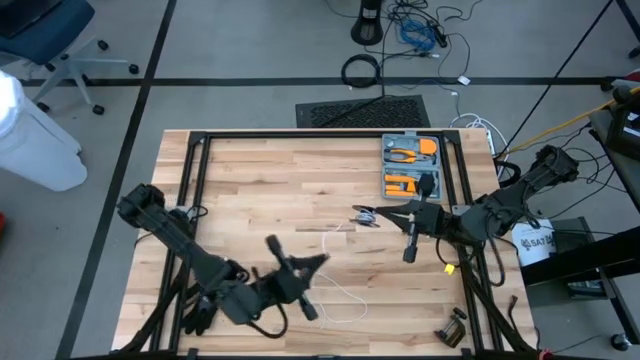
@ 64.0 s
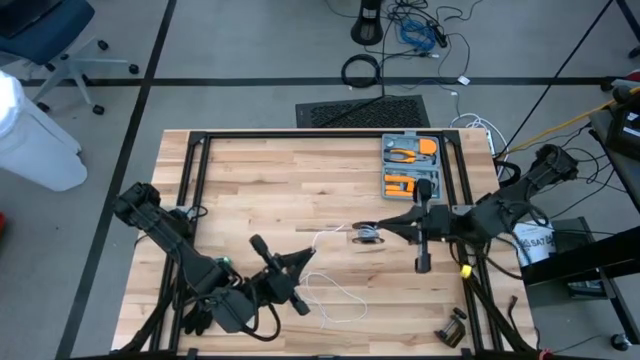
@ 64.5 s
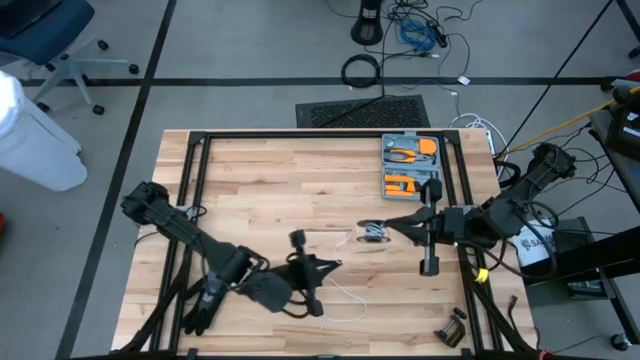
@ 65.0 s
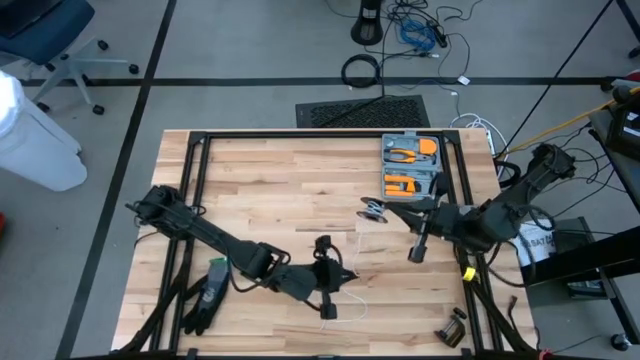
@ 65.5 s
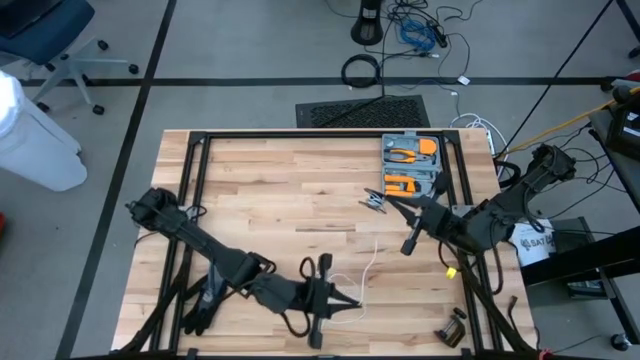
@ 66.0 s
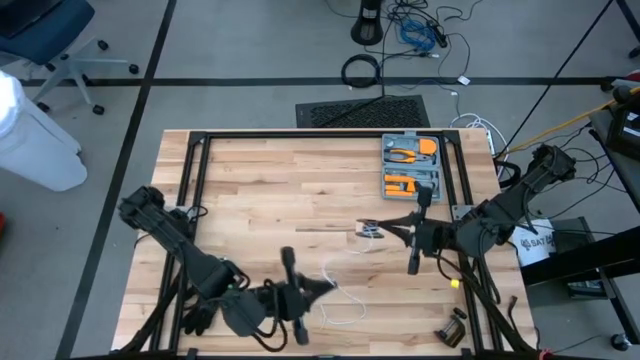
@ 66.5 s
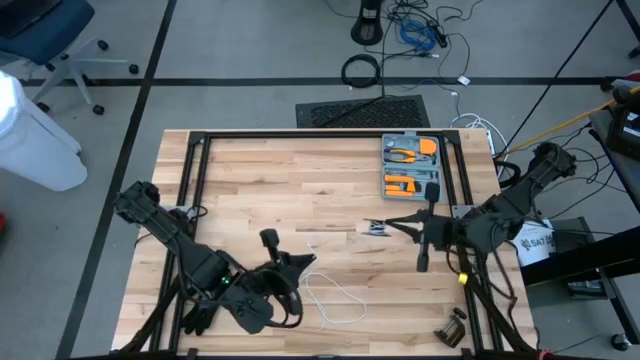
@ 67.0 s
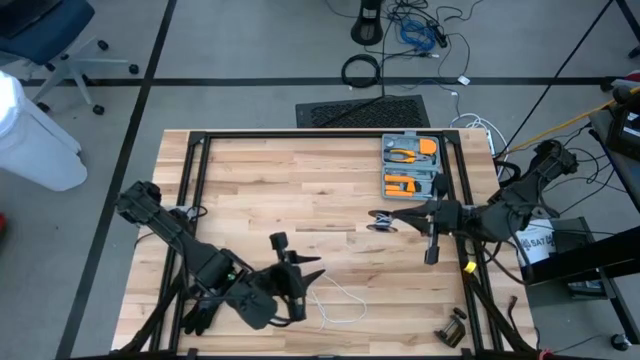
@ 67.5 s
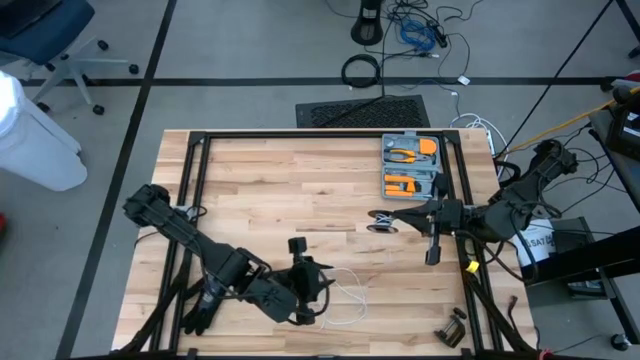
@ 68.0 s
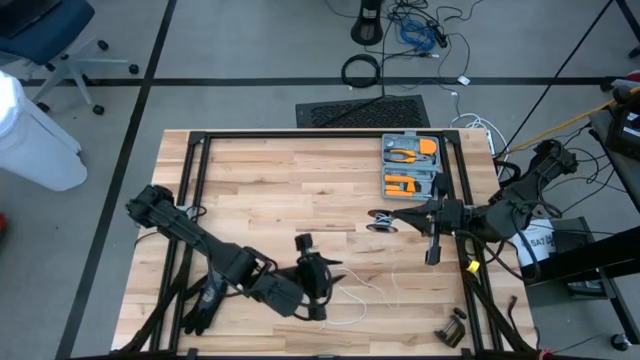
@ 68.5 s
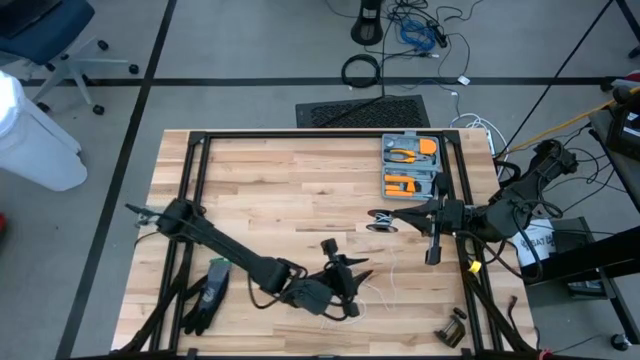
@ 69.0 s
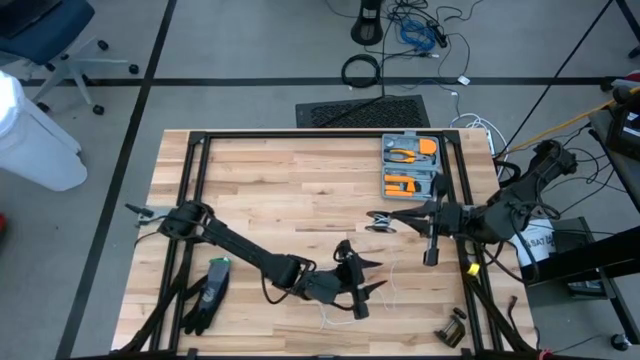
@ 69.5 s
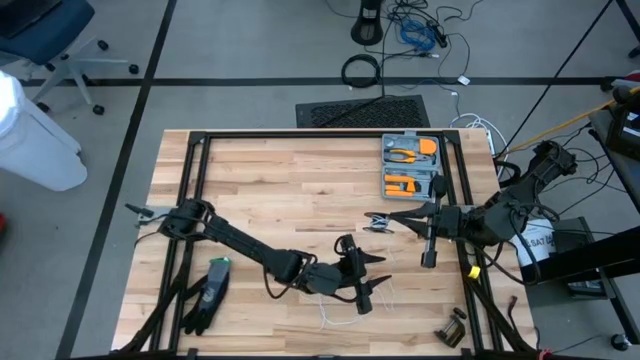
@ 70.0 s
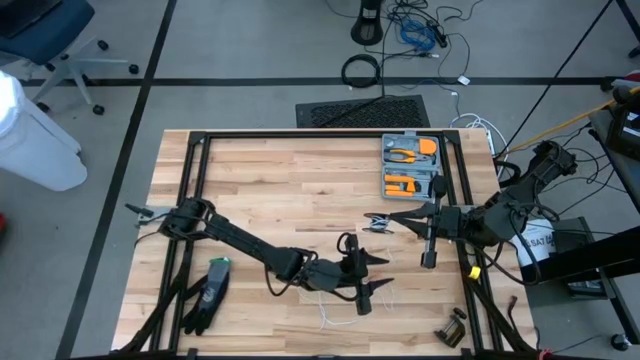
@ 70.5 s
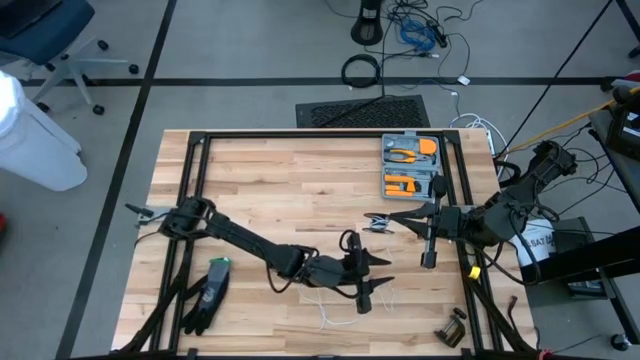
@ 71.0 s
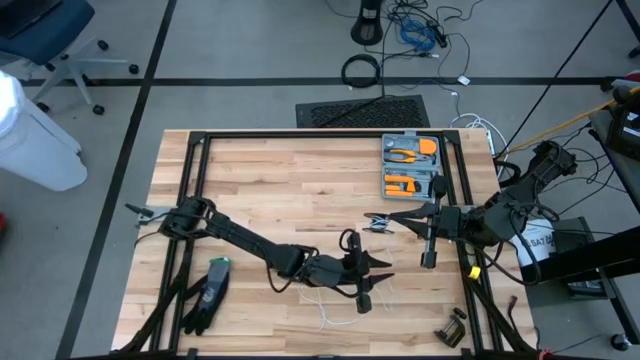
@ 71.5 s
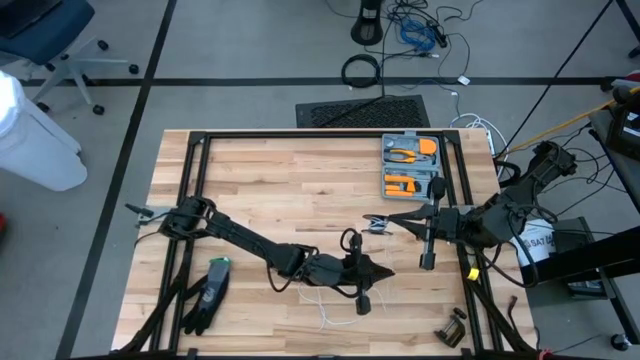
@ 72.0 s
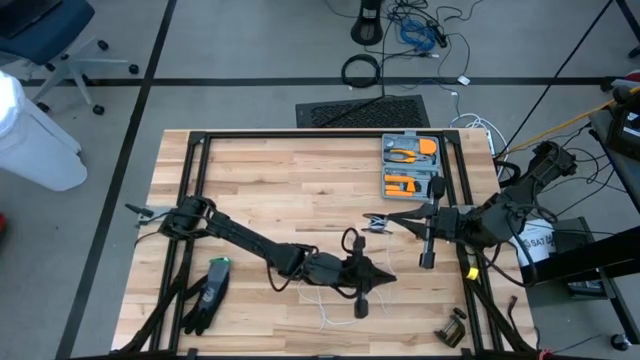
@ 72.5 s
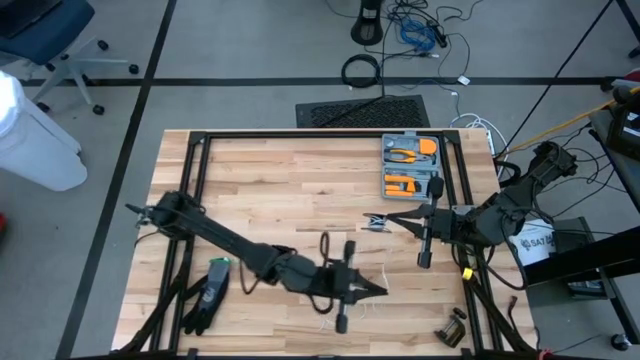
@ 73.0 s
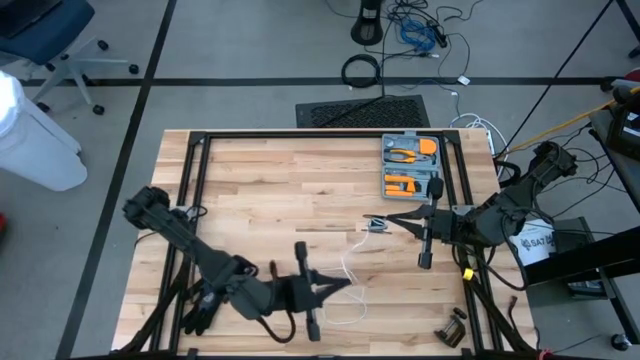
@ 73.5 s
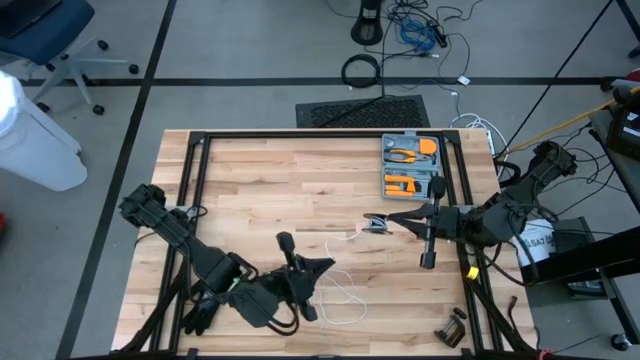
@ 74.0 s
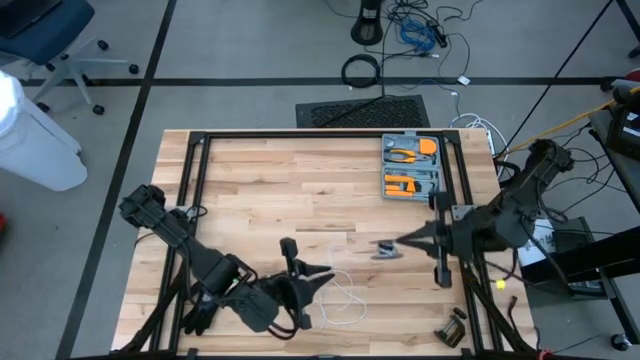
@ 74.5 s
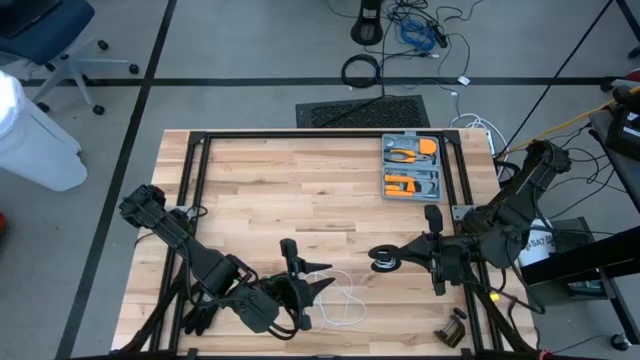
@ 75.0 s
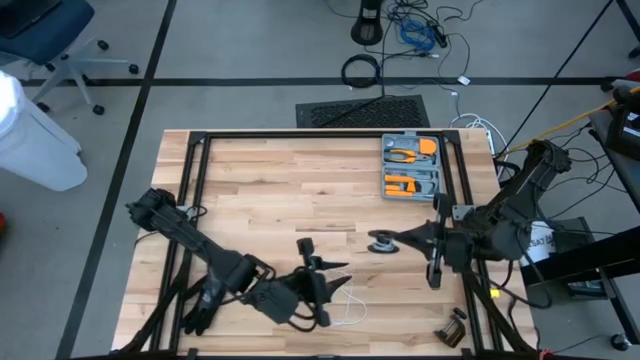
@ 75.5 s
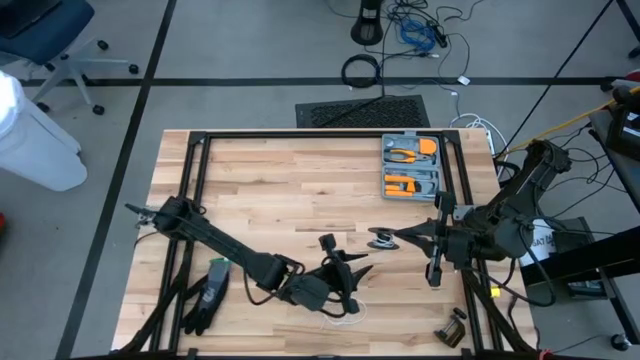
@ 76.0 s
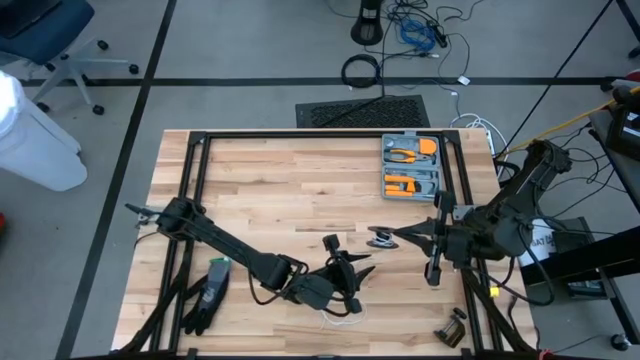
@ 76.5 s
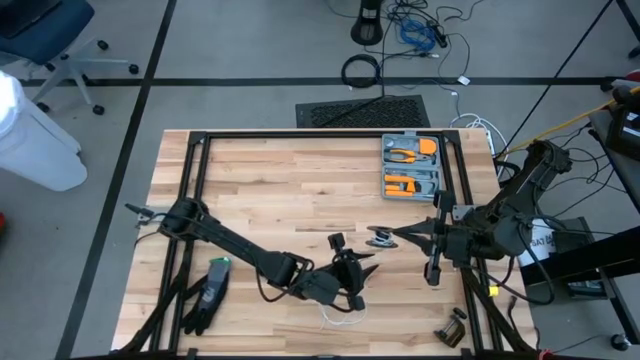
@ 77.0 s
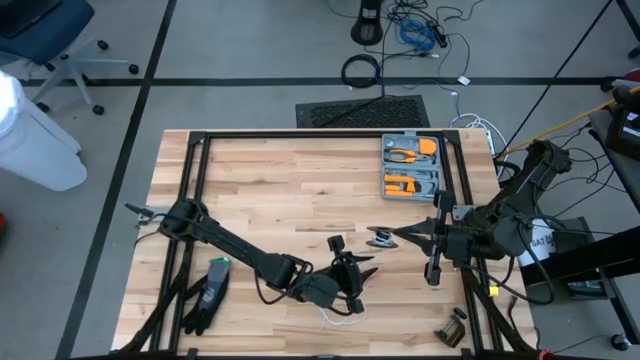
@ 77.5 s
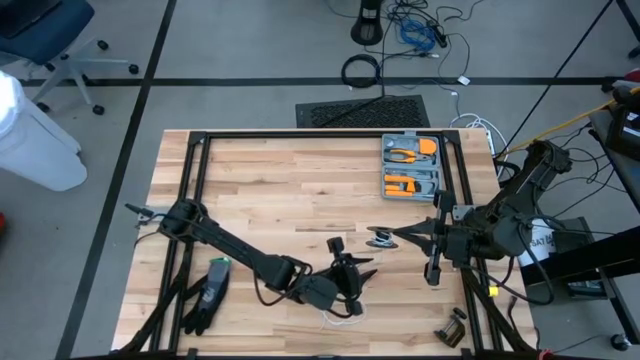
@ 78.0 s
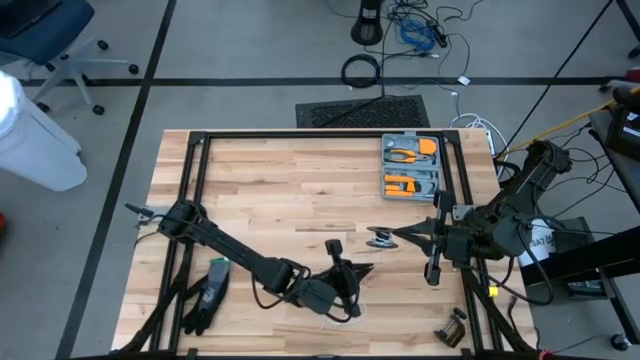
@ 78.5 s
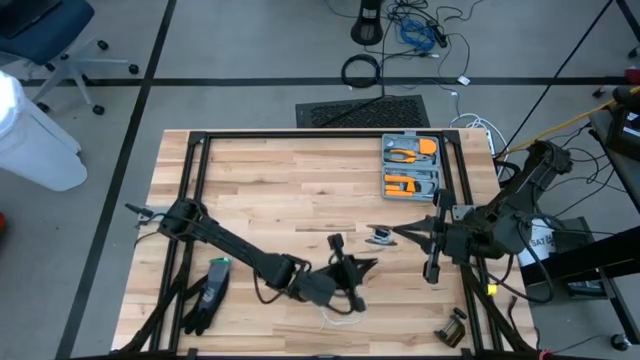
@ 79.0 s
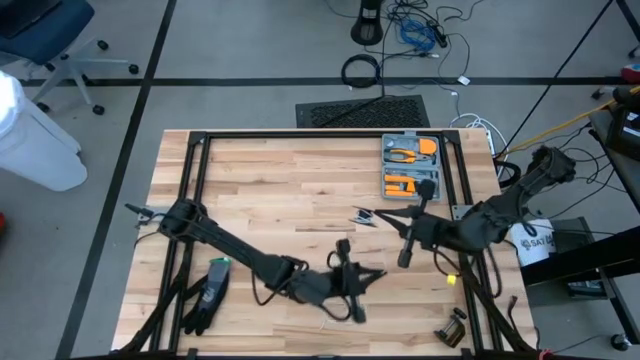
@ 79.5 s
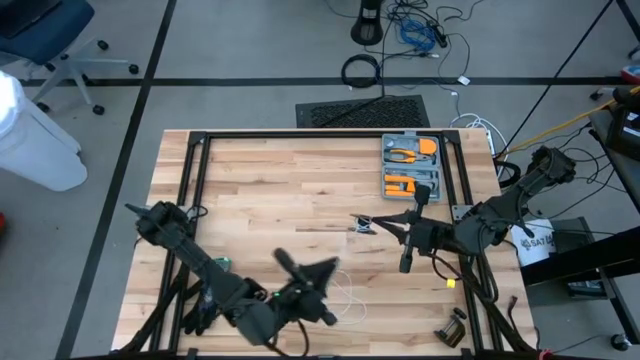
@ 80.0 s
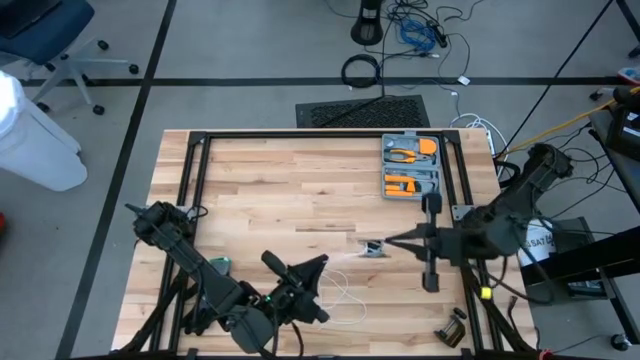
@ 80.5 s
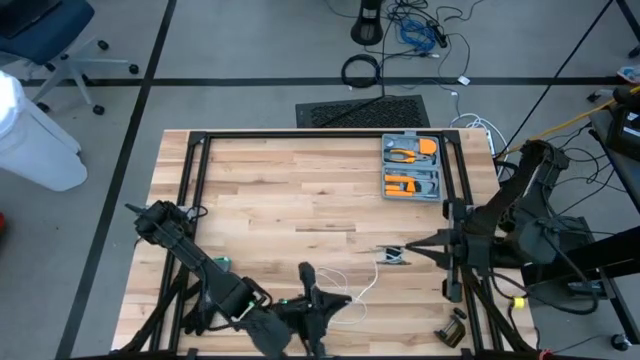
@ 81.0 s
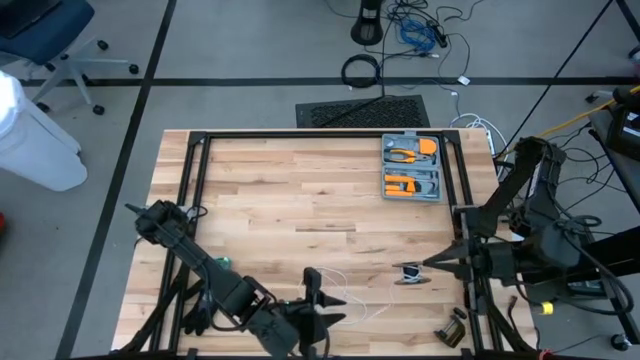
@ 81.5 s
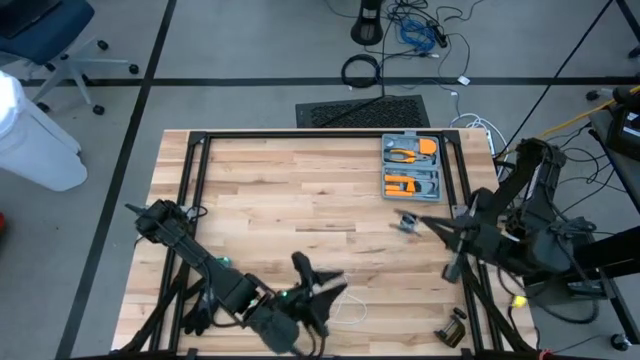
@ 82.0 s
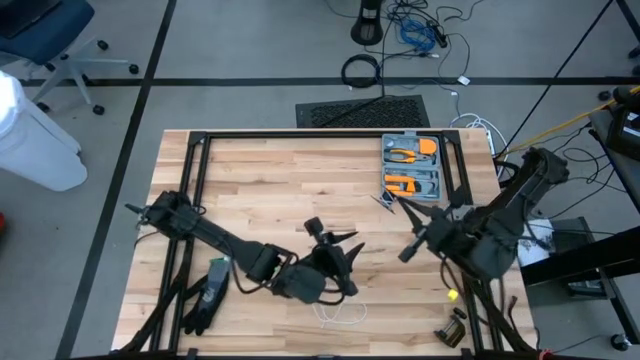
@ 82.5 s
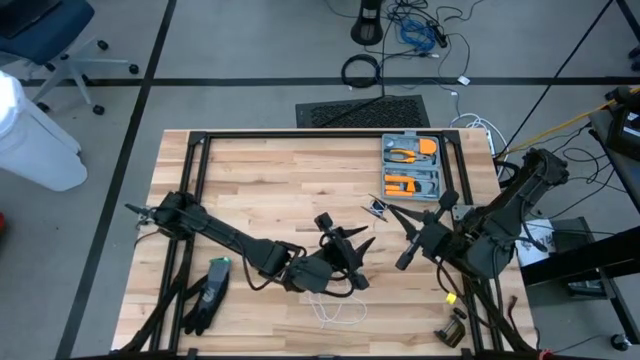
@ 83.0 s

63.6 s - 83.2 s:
Task: Coil cords
Uncoil the white wire from the spool
